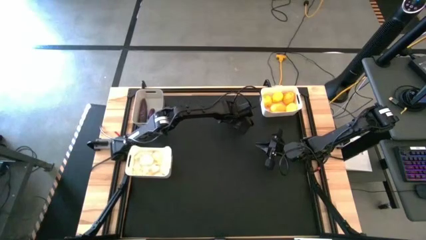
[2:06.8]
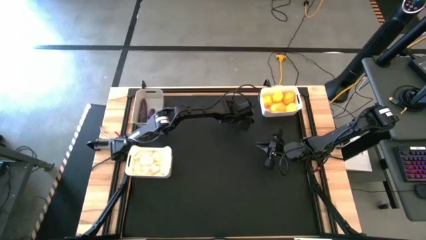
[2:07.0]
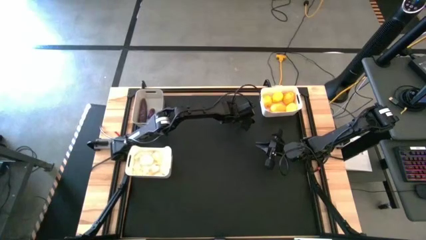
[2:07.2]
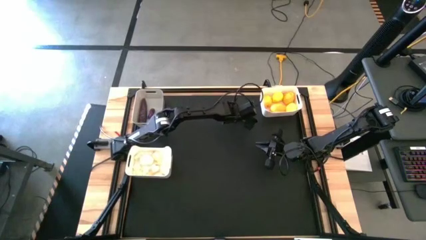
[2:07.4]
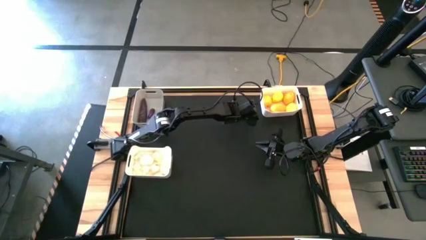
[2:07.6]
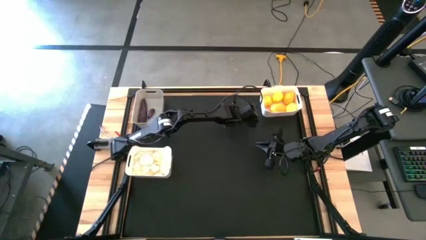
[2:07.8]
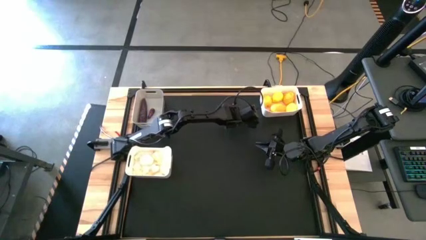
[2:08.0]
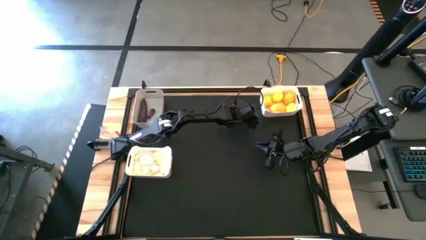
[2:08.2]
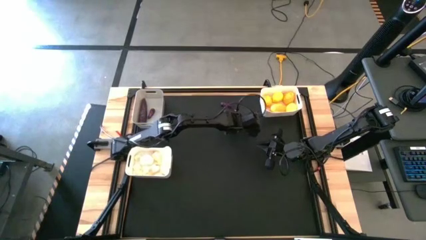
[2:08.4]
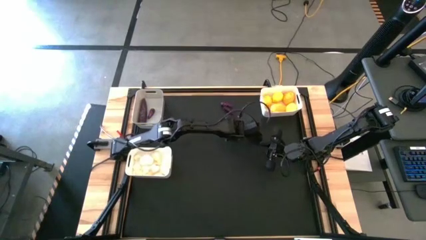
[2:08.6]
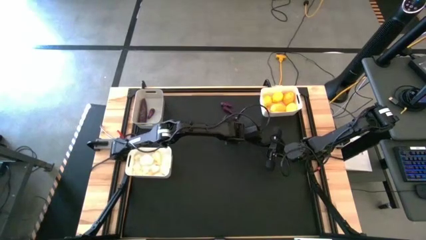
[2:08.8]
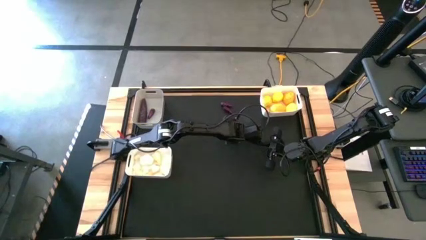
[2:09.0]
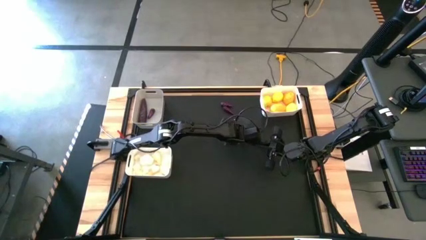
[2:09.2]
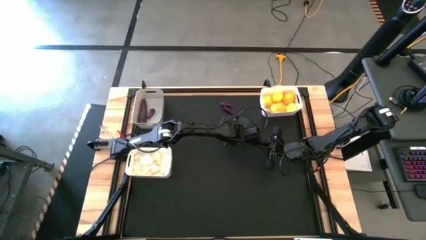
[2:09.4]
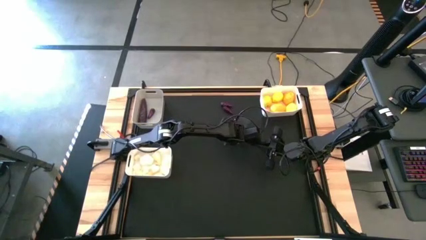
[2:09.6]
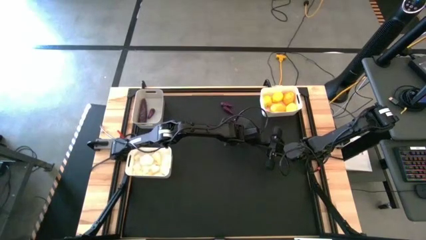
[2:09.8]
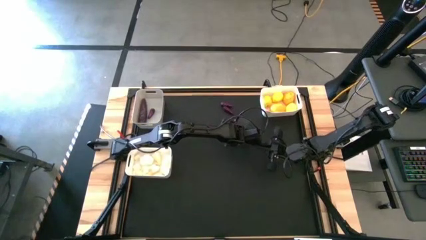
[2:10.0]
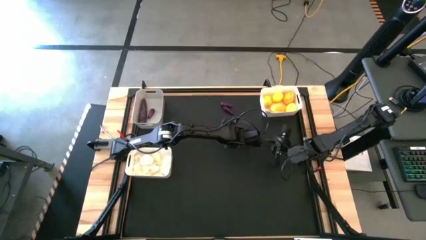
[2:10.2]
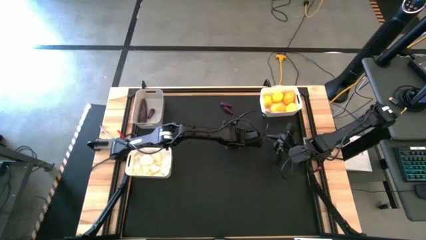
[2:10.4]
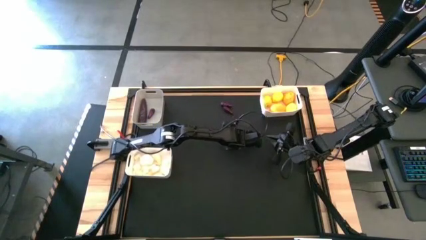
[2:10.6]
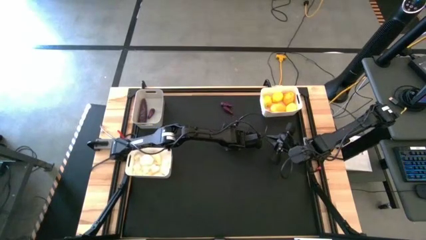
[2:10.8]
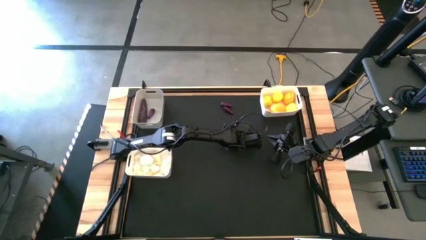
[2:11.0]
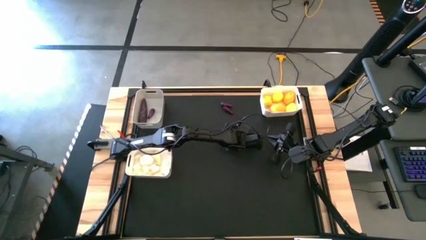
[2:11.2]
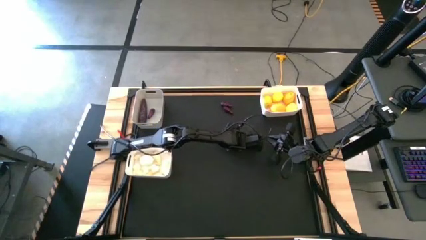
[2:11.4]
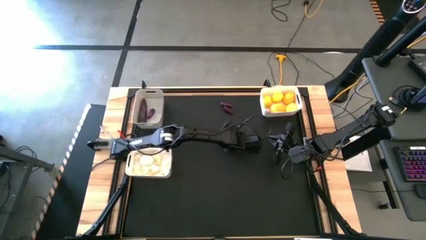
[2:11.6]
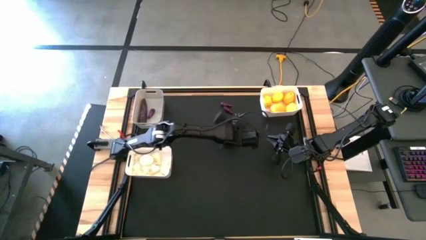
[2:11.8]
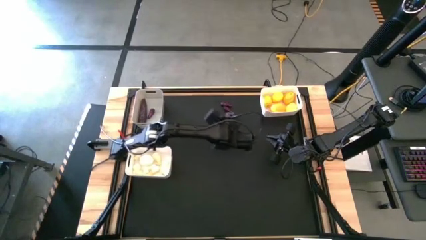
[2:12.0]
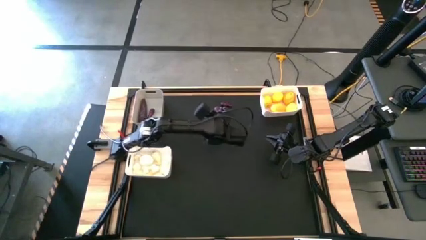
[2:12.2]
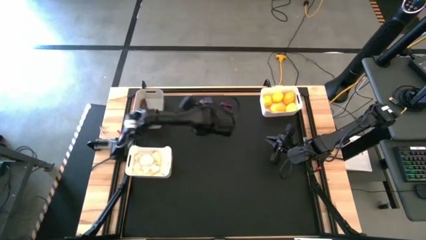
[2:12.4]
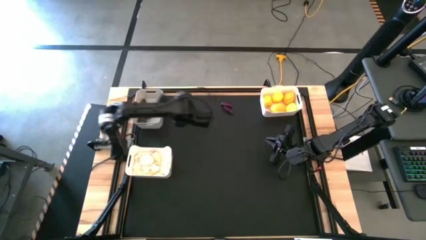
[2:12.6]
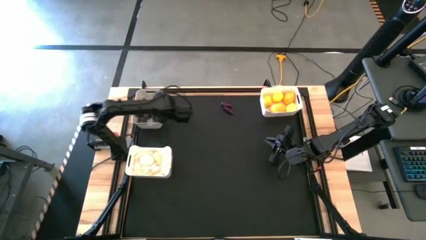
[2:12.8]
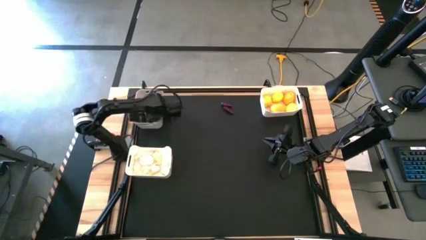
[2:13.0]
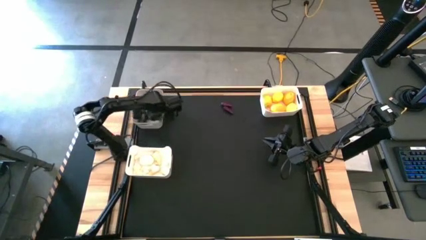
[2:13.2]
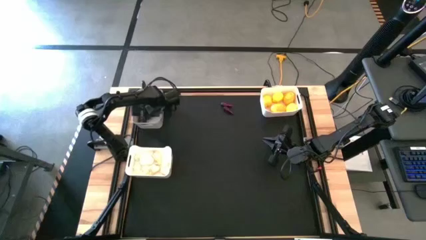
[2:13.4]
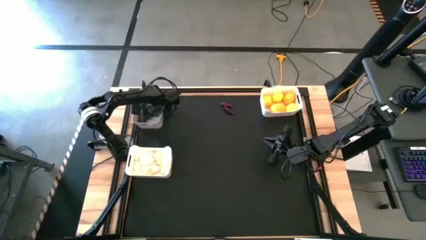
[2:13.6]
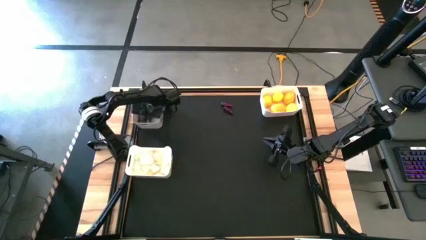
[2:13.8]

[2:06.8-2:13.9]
Task: Sort produce into baskets
Put the violet eggplant into the gray bin

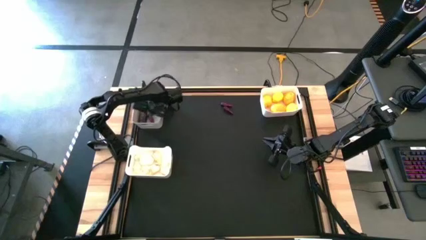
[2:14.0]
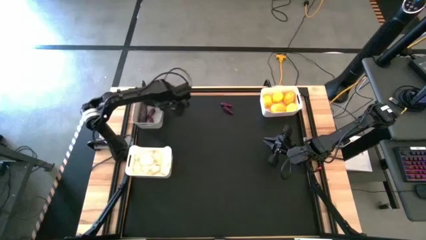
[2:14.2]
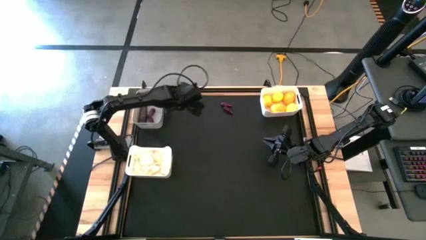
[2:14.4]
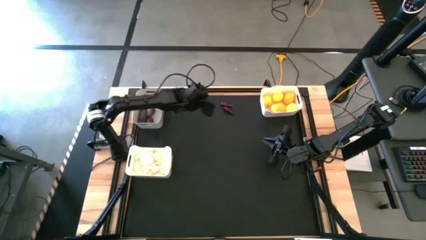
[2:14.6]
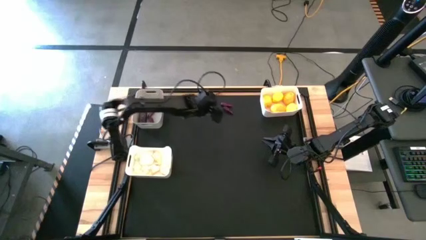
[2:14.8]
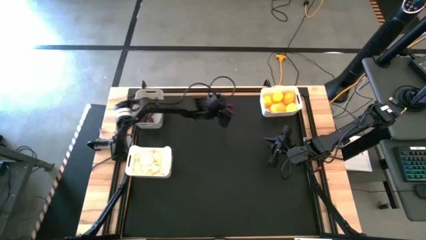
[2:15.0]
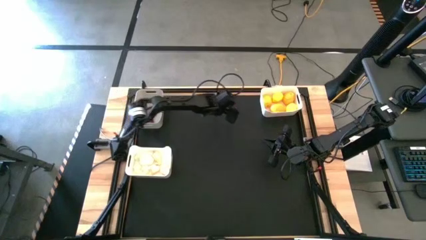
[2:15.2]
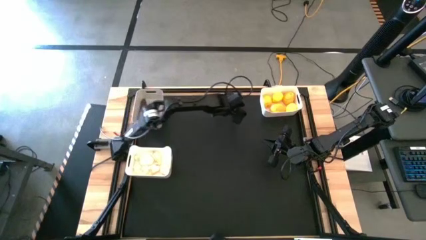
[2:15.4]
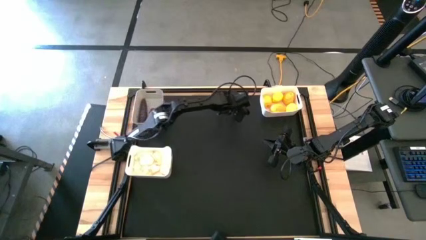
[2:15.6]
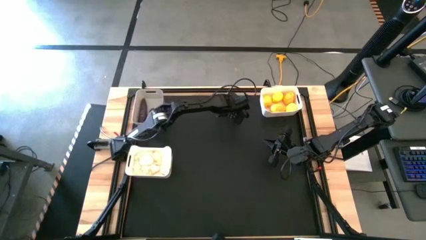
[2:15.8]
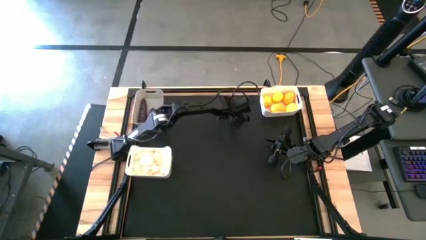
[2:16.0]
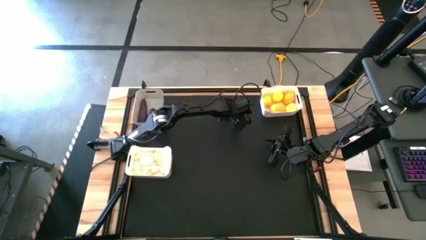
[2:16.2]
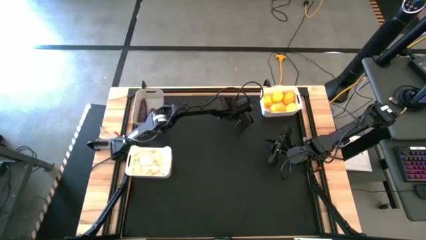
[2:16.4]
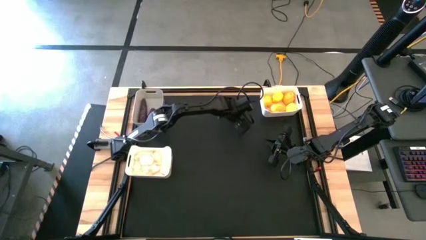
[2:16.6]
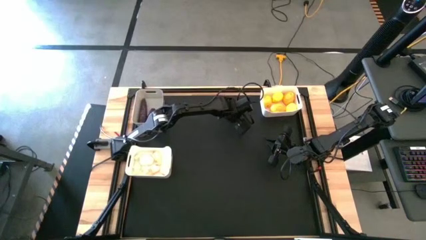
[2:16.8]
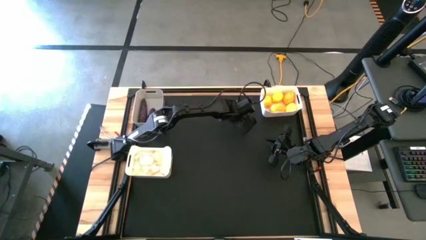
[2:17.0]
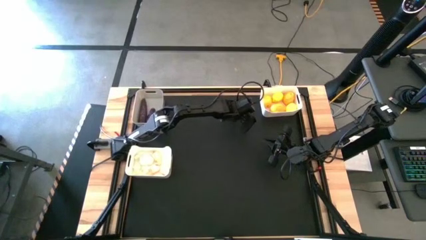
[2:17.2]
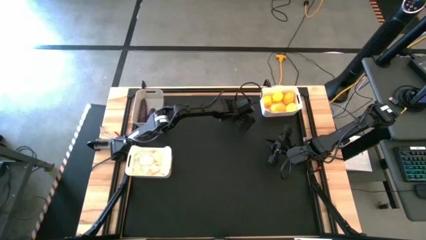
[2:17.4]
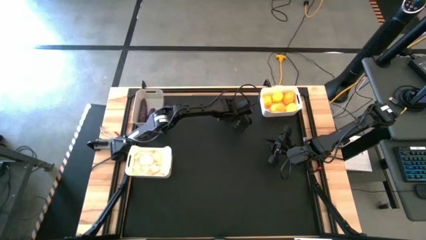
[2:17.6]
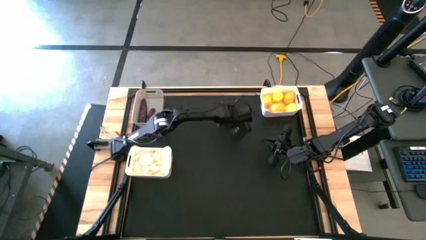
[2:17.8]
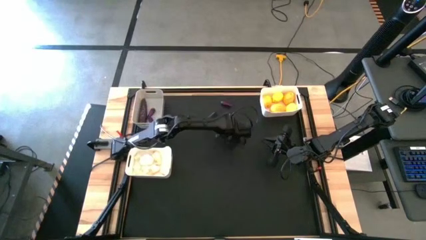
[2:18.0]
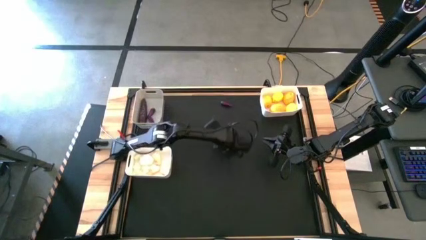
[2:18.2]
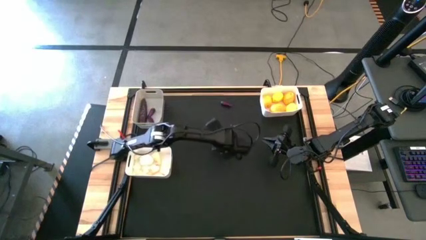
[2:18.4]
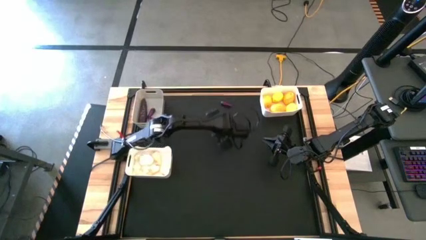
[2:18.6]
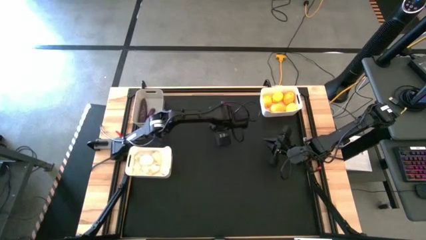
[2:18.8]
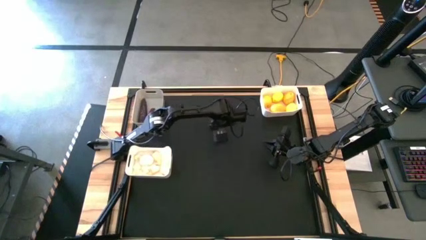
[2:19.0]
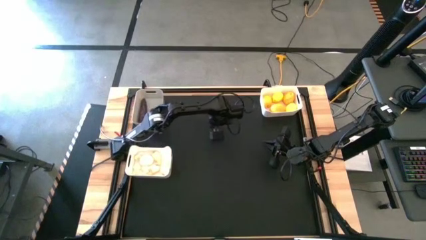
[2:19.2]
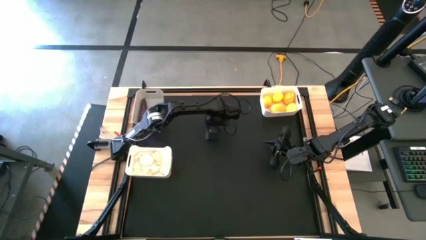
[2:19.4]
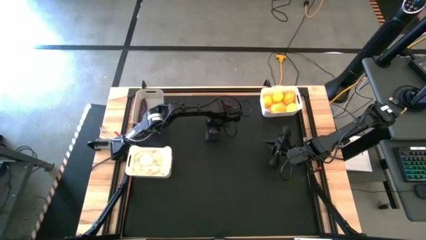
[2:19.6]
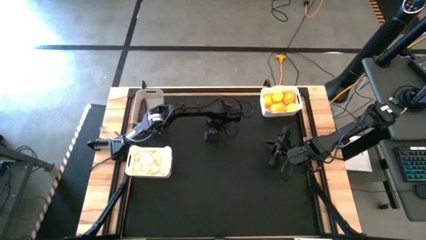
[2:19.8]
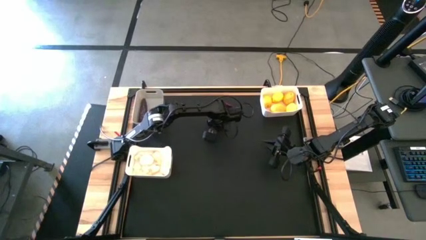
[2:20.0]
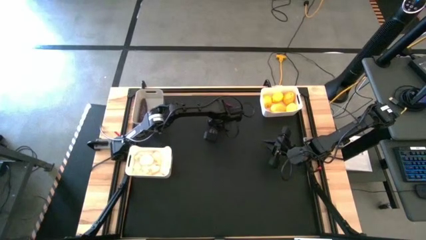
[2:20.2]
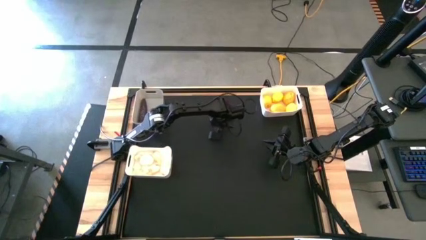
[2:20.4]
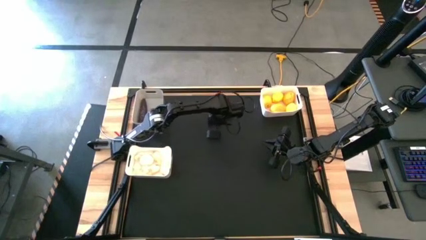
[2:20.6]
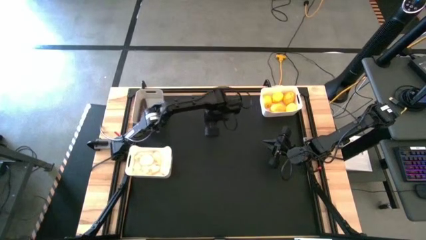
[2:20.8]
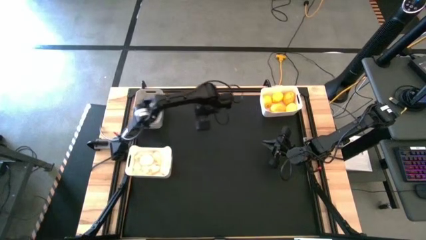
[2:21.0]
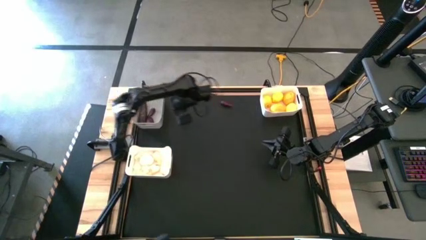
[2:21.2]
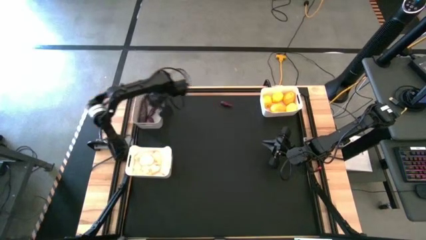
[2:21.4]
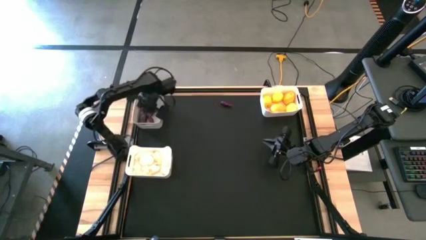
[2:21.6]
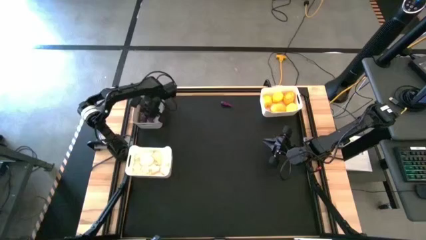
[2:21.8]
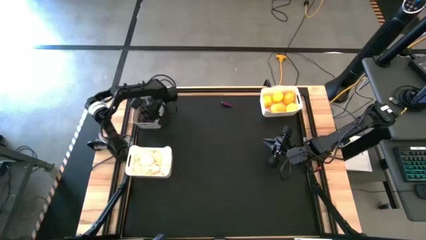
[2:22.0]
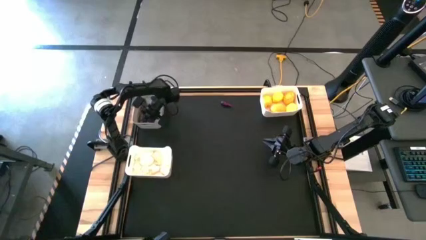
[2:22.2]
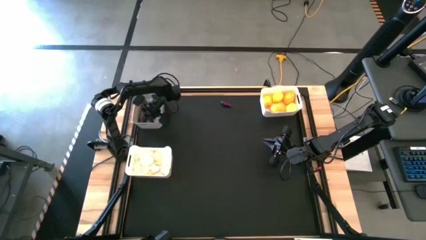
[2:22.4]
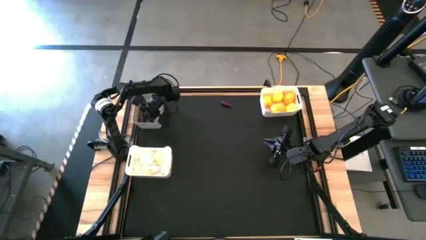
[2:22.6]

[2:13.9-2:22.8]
Put the violet eggplant into the gray bin

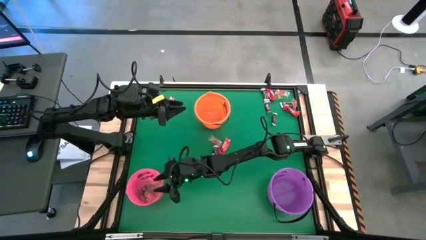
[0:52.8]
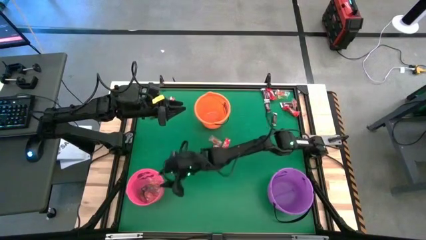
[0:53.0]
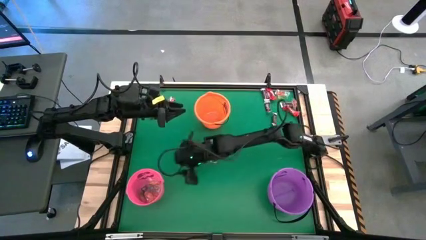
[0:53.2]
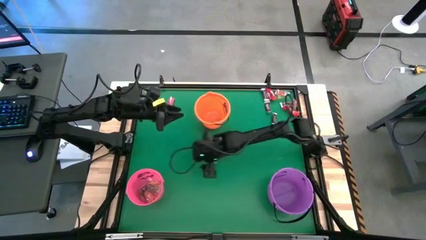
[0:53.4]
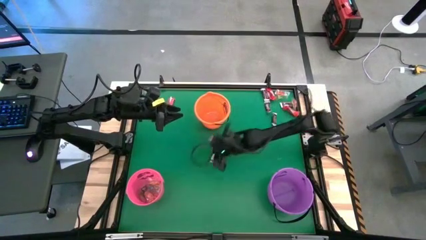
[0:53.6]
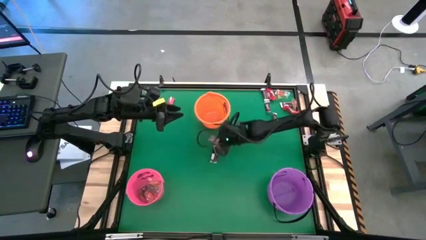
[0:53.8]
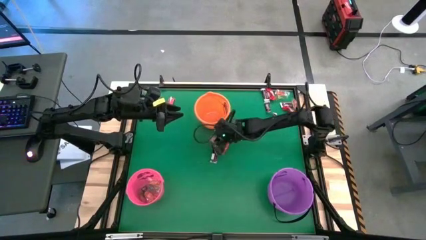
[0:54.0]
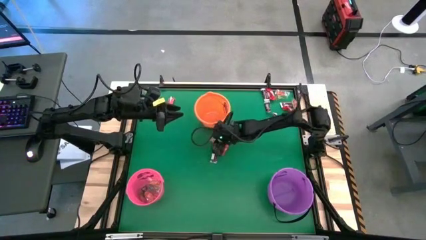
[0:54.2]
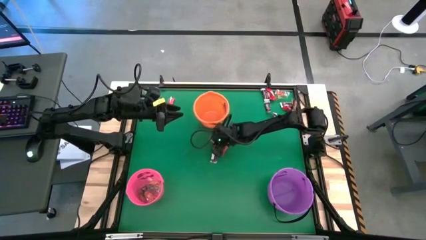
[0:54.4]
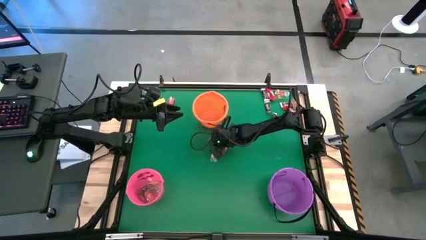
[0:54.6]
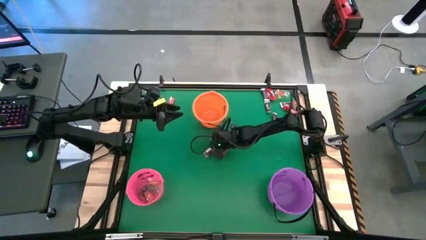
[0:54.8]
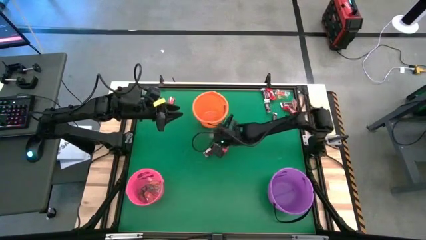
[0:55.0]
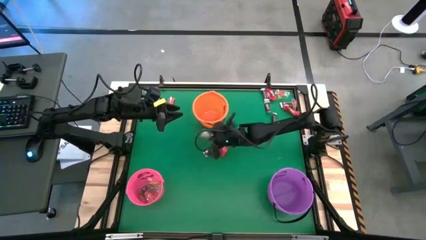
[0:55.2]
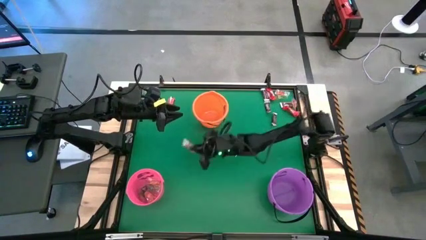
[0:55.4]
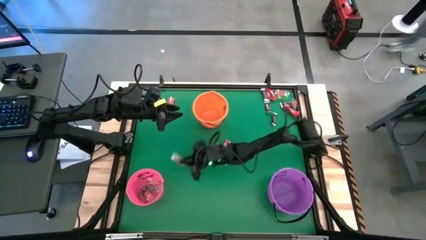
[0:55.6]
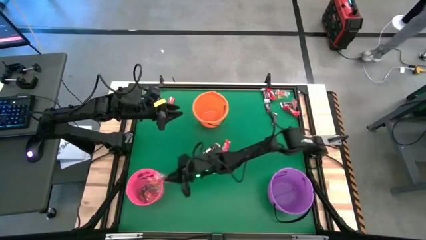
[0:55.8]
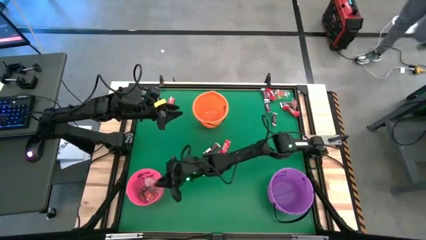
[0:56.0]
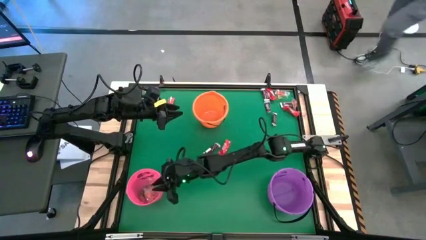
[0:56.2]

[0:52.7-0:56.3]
Task: Sort candy by brand, put in halloween buckets
Put the orange gummy into the pink bucket
